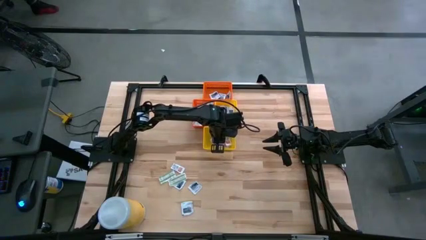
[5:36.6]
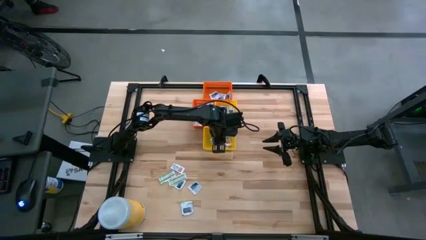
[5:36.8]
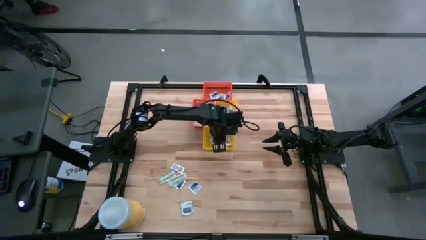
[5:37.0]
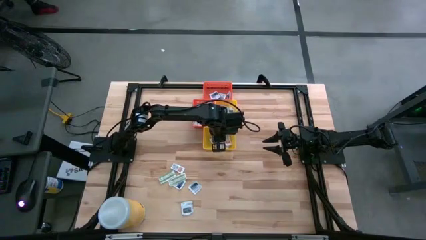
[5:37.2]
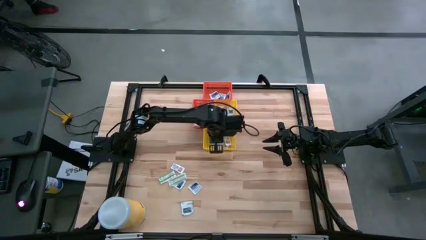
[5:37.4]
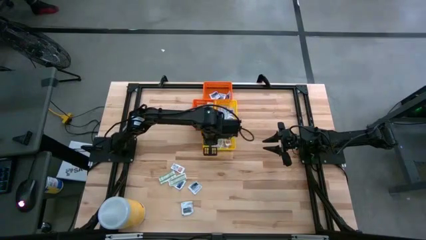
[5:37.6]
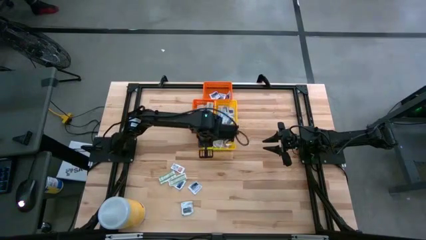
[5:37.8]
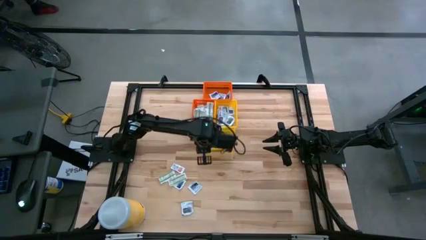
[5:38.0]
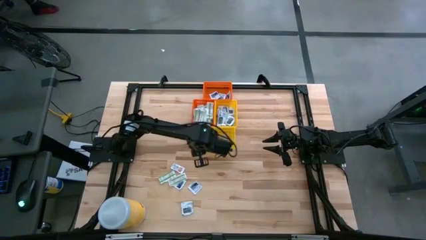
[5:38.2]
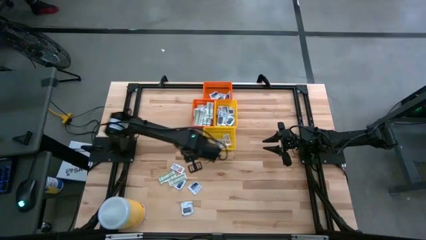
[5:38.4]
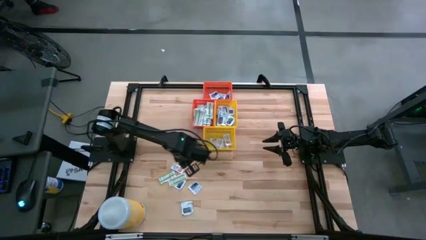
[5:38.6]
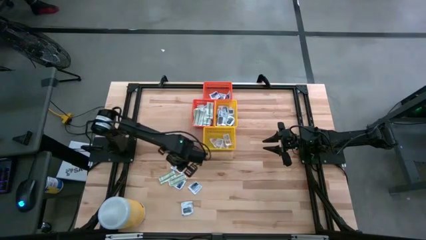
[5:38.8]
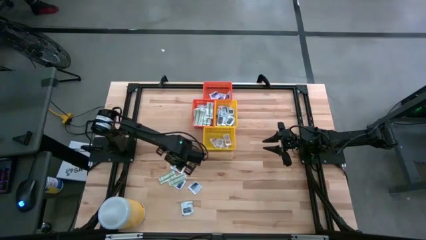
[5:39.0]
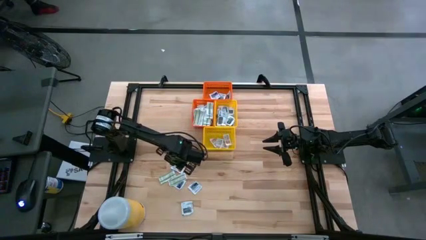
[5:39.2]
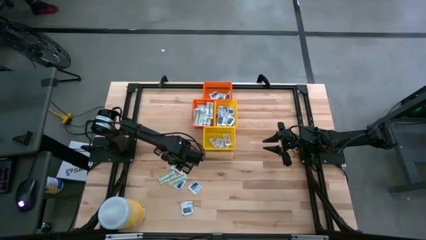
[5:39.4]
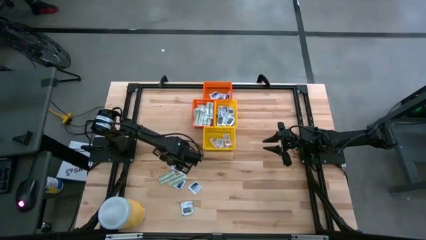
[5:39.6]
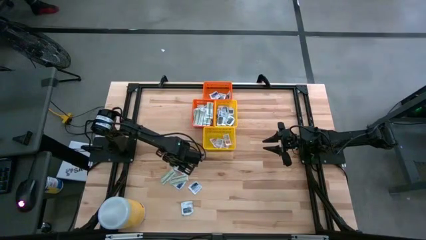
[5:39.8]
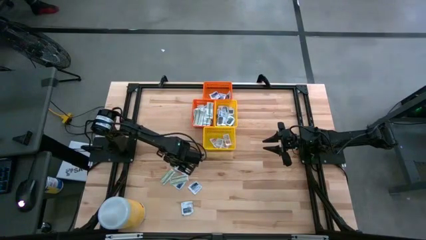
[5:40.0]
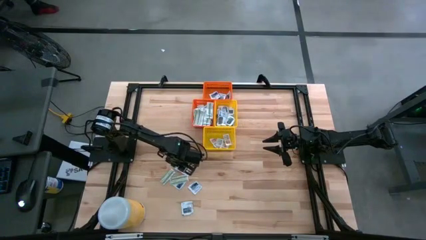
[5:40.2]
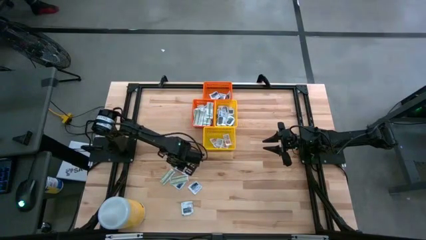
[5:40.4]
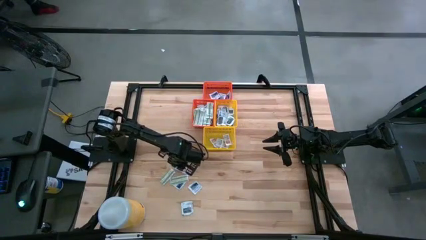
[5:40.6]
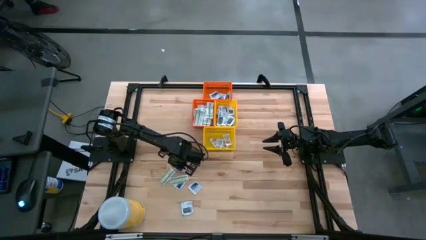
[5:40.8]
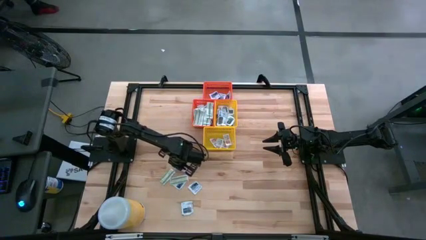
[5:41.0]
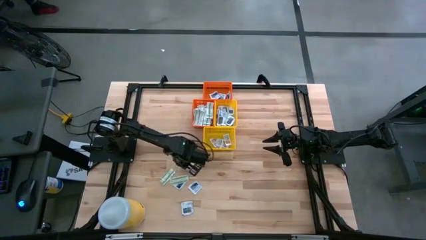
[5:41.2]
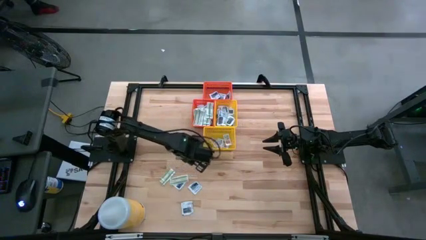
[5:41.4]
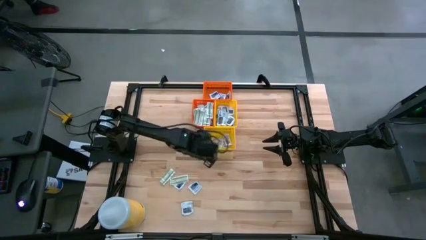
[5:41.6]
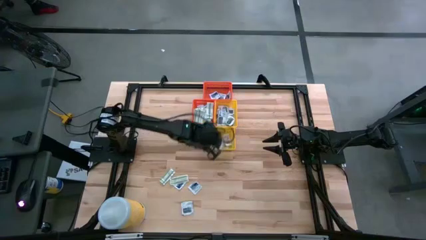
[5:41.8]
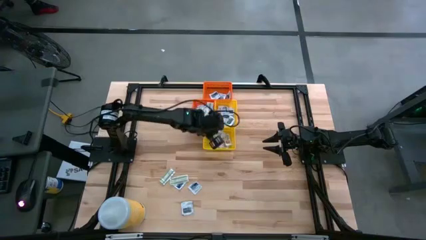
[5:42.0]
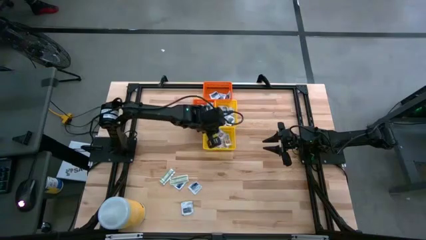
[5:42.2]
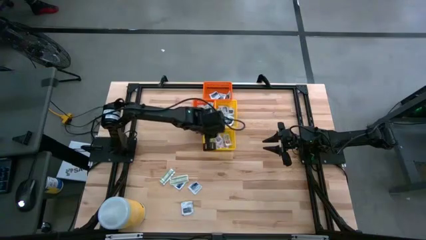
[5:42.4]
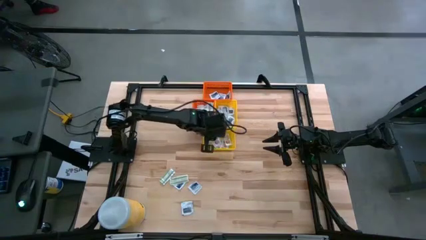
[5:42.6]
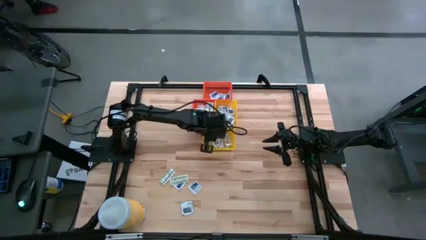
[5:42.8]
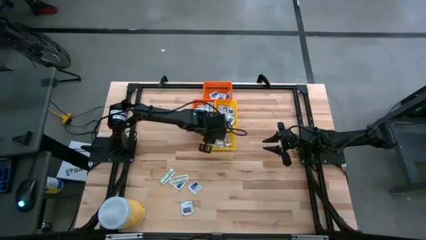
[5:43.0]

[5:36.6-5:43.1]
Task: Pick & Place First Aid Supplies
Put the ointment pack into the bottom yellow bin

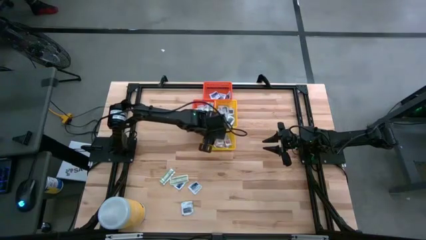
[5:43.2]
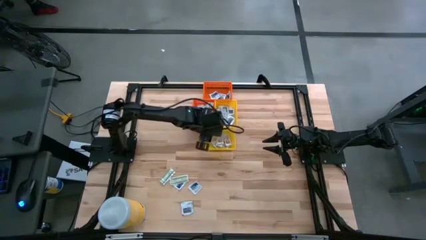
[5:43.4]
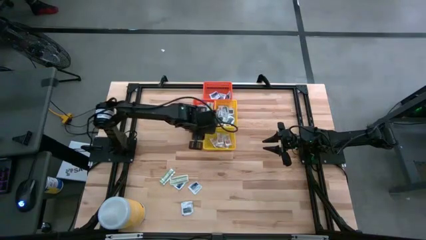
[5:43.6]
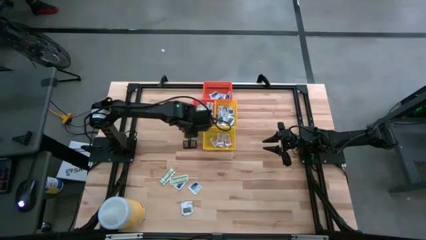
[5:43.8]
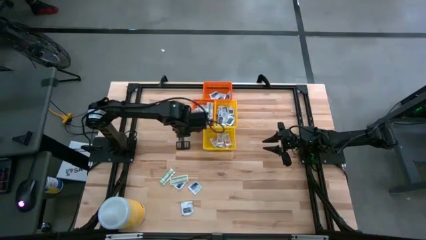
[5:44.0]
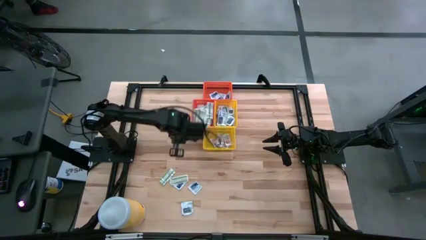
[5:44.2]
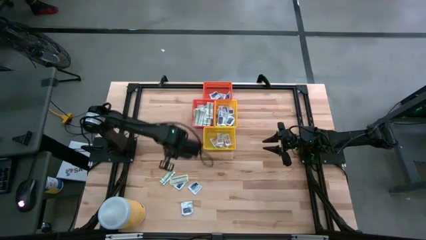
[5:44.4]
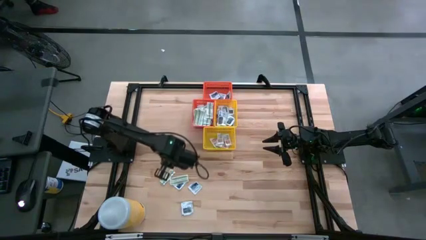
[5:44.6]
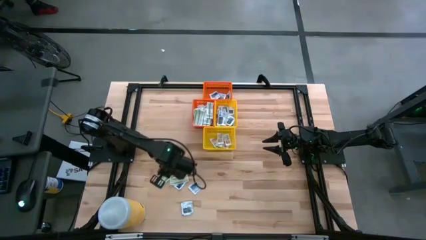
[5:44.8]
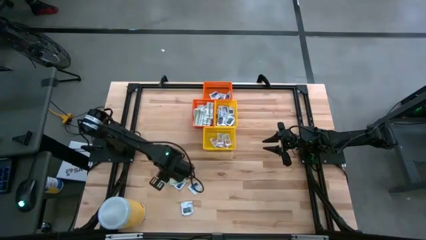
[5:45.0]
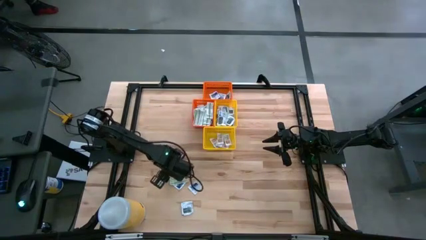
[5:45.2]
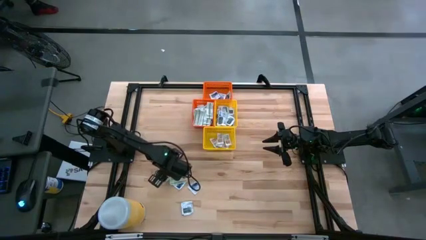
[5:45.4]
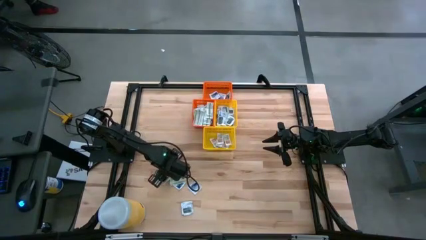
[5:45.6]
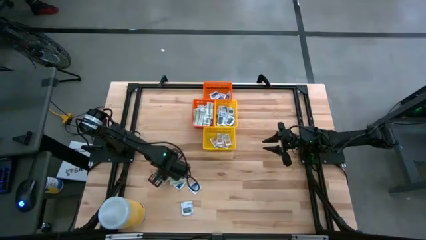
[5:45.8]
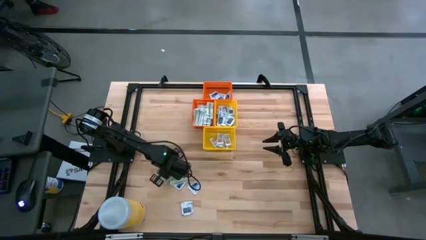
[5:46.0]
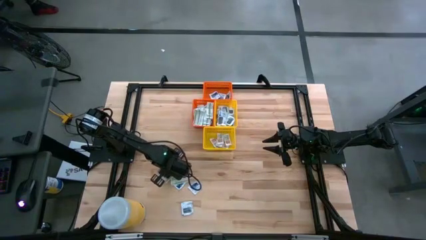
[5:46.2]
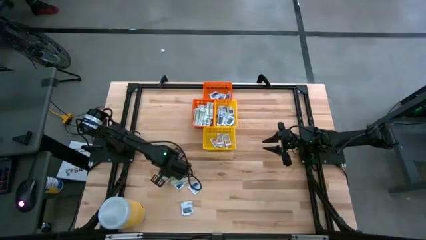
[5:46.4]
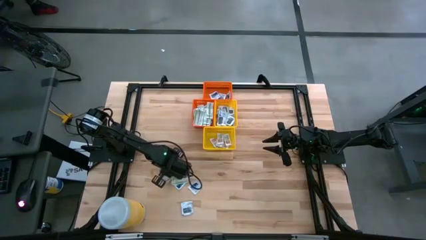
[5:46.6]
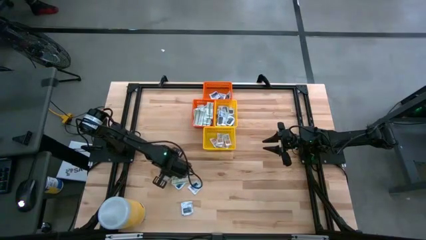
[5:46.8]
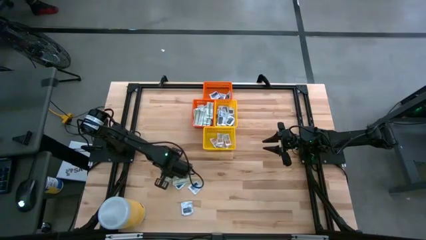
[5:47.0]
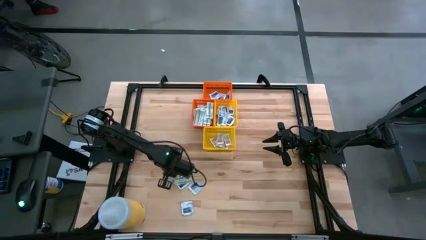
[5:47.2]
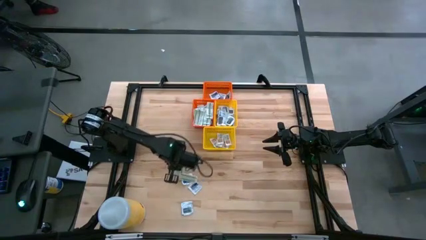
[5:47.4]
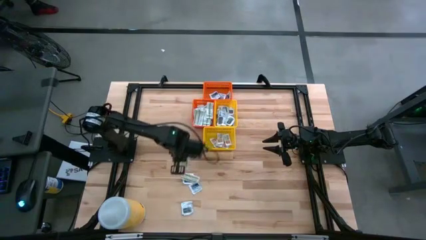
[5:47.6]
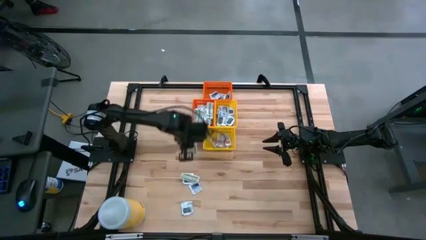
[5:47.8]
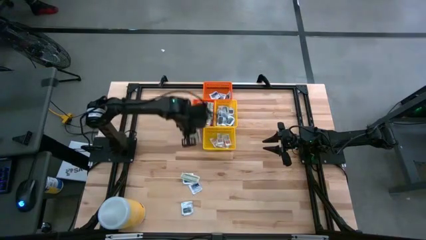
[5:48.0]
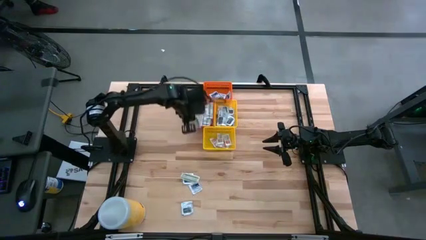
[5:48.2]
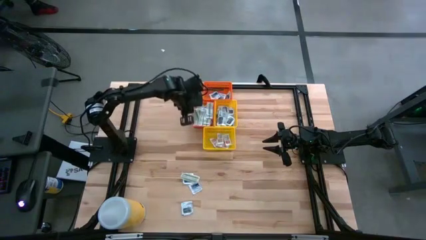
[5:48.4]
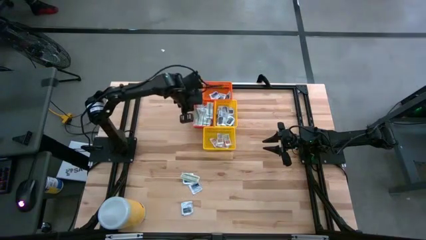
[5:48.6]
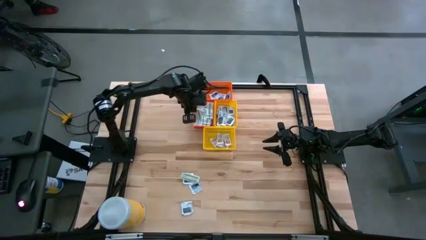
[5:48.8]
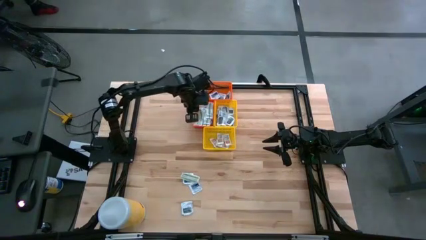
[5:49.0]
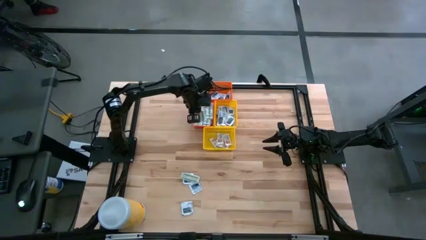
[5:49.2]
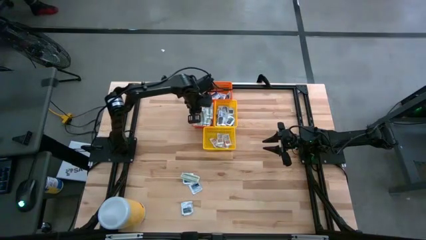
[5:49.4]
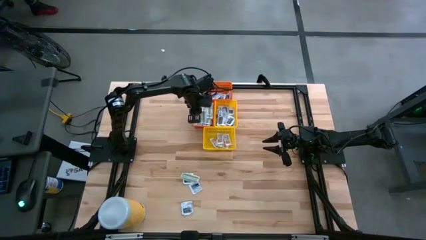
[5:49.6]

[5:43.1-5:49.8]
Put the bandage into the bottom orange bin
